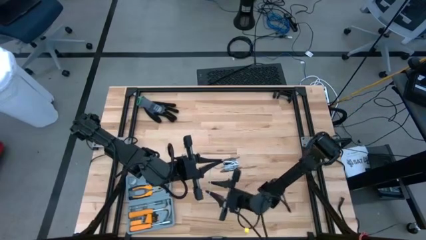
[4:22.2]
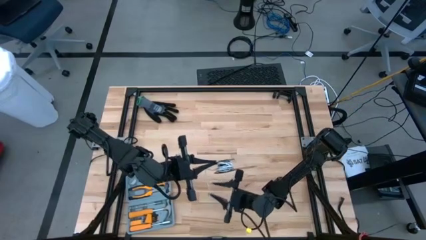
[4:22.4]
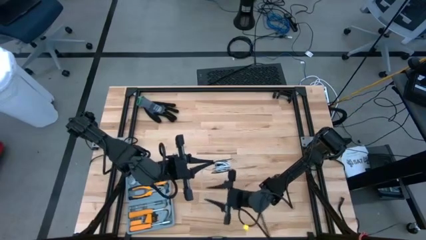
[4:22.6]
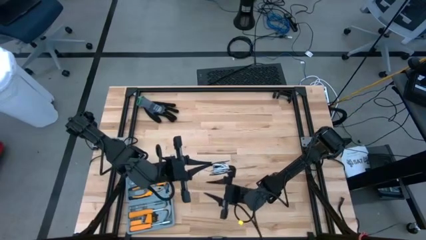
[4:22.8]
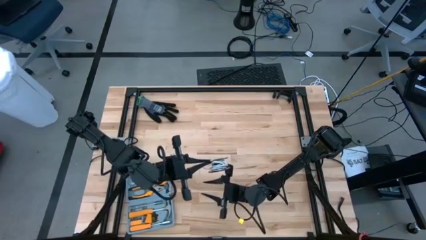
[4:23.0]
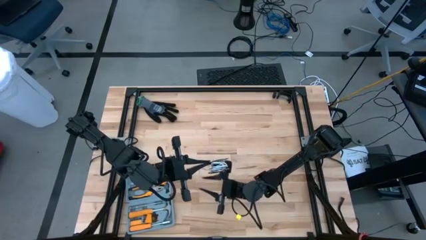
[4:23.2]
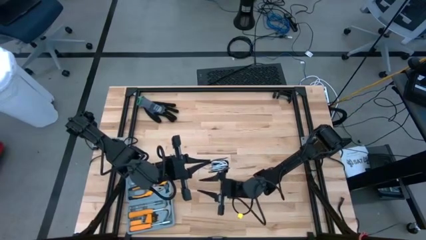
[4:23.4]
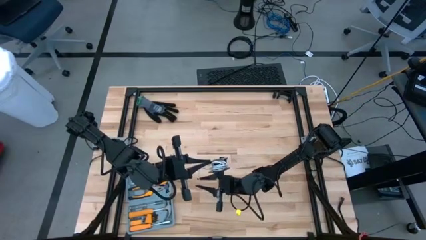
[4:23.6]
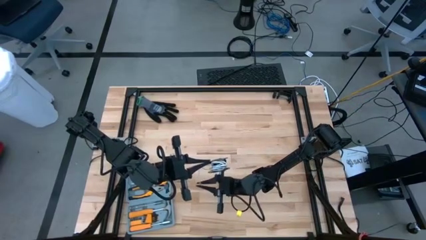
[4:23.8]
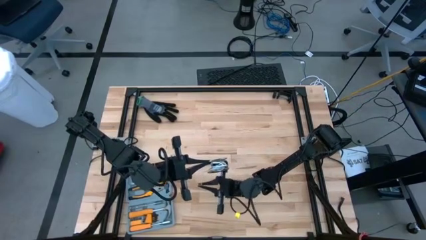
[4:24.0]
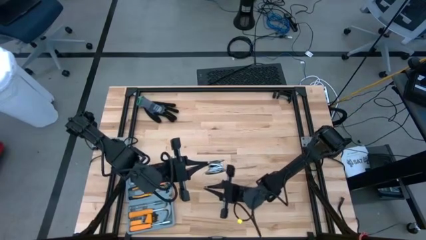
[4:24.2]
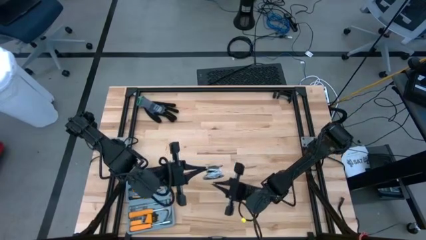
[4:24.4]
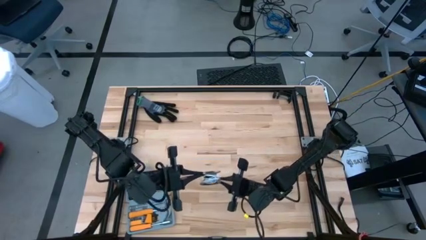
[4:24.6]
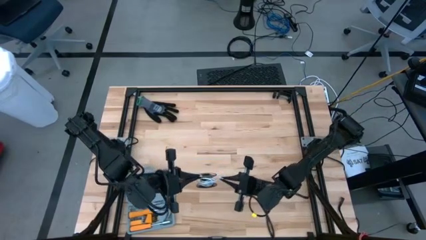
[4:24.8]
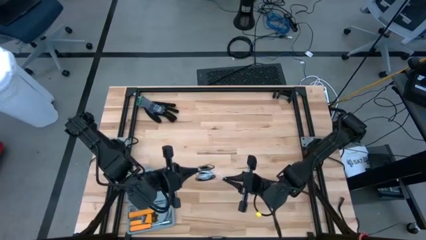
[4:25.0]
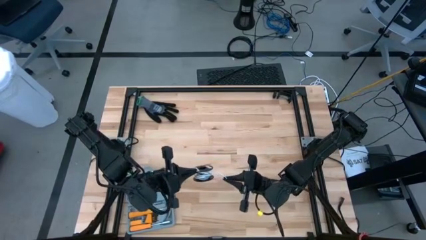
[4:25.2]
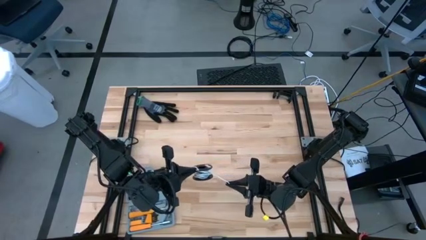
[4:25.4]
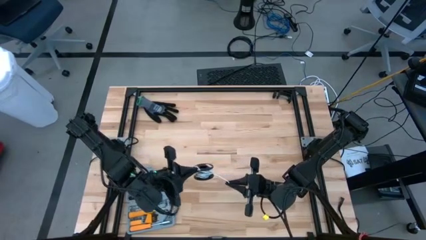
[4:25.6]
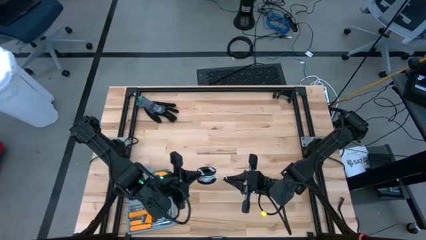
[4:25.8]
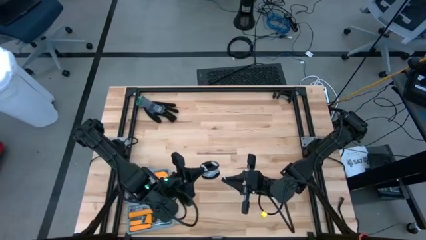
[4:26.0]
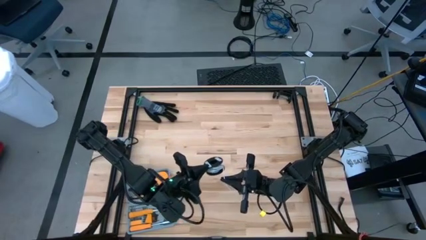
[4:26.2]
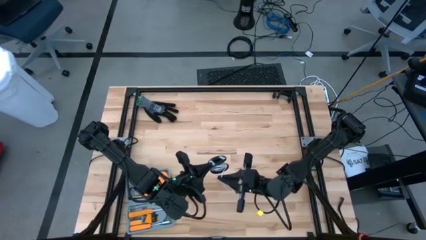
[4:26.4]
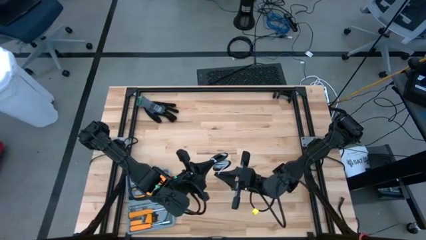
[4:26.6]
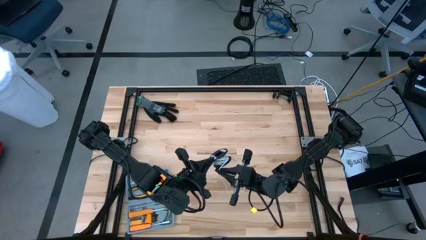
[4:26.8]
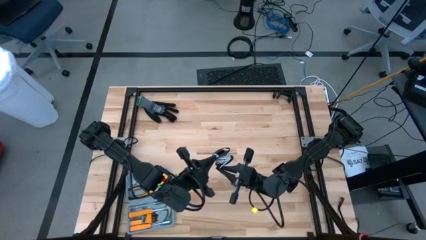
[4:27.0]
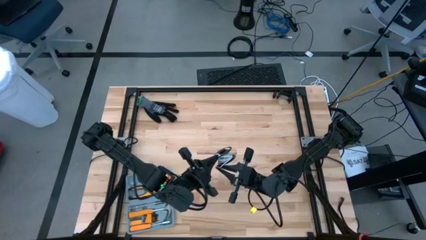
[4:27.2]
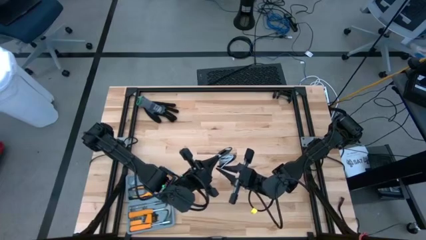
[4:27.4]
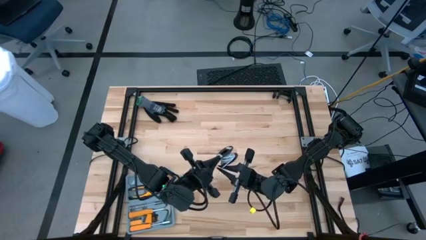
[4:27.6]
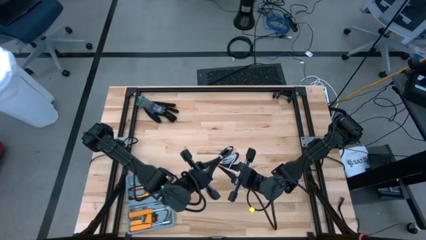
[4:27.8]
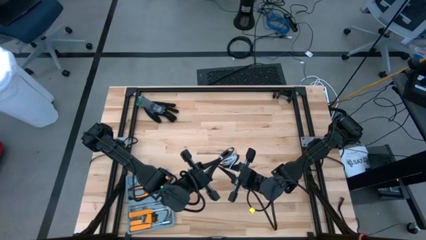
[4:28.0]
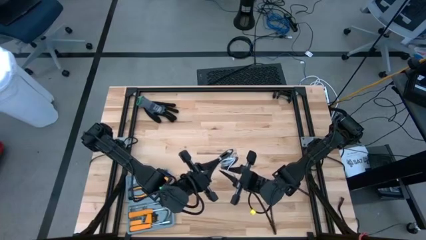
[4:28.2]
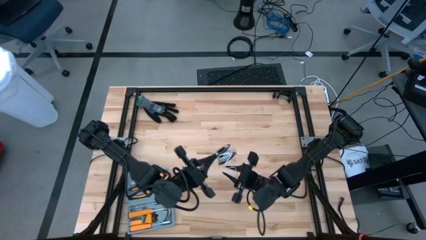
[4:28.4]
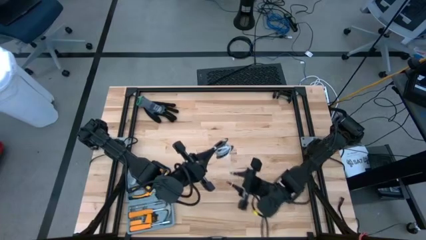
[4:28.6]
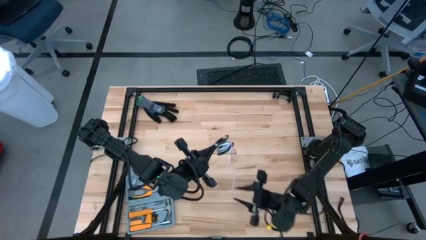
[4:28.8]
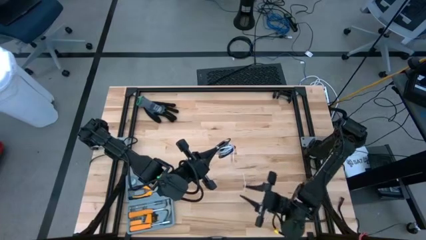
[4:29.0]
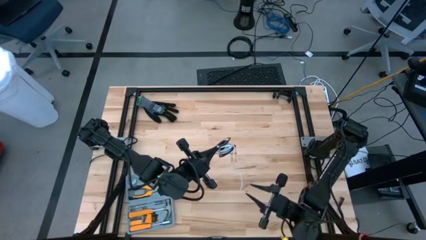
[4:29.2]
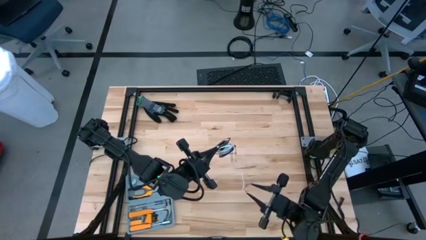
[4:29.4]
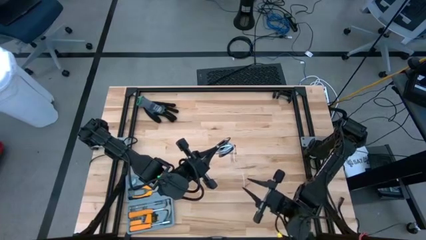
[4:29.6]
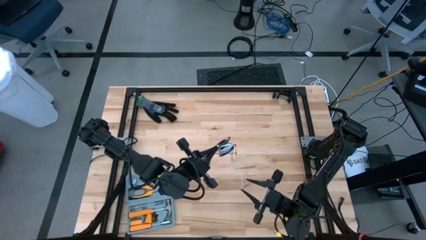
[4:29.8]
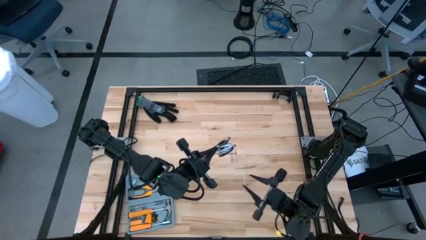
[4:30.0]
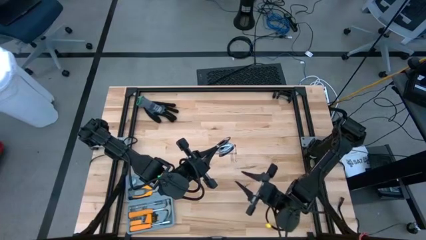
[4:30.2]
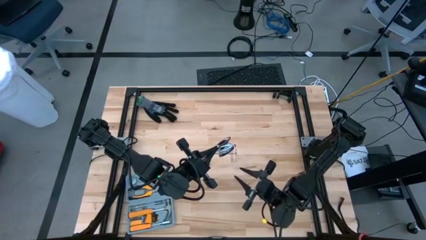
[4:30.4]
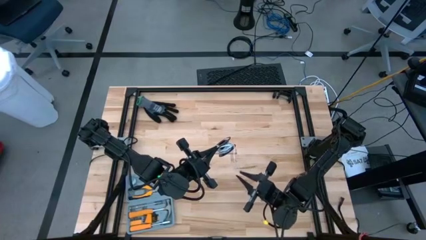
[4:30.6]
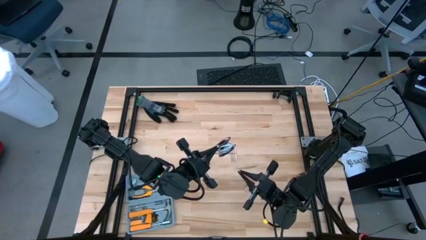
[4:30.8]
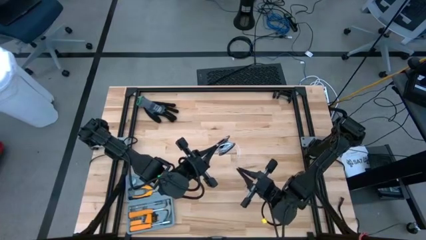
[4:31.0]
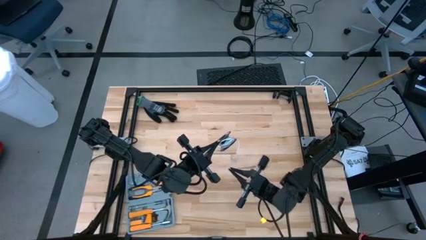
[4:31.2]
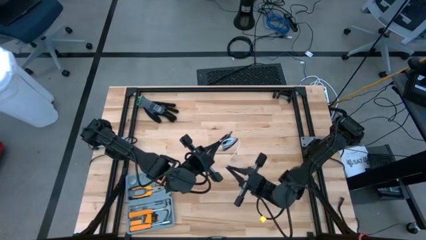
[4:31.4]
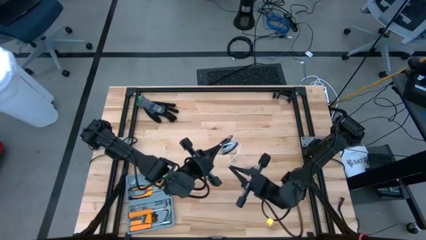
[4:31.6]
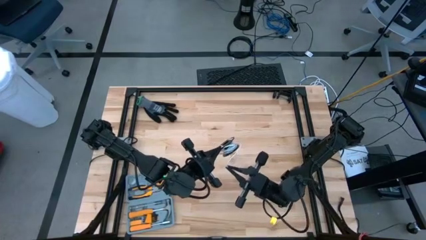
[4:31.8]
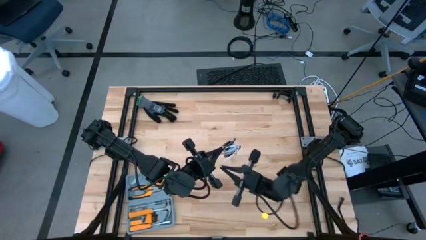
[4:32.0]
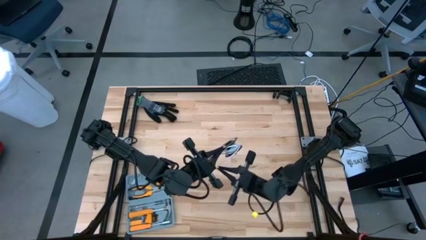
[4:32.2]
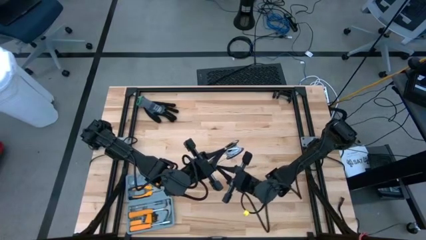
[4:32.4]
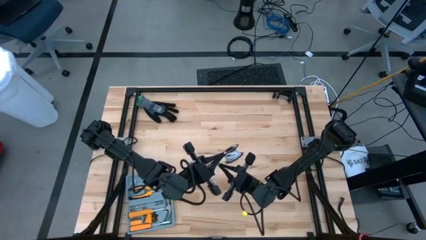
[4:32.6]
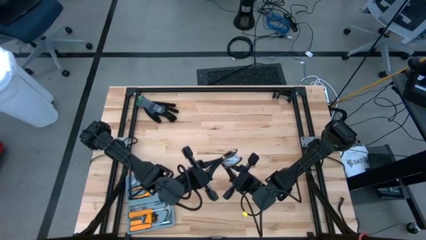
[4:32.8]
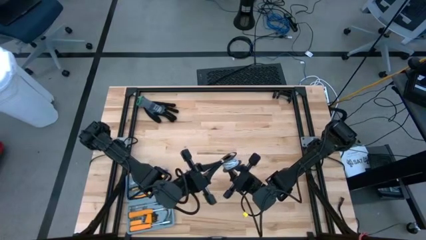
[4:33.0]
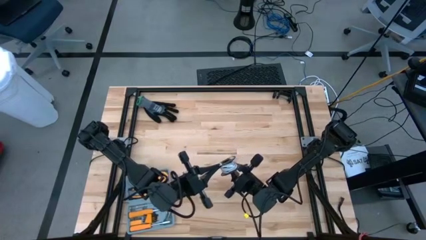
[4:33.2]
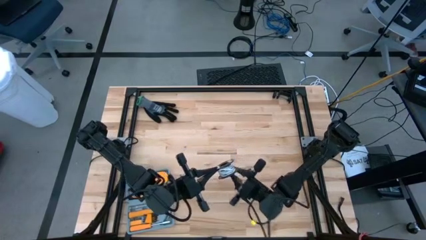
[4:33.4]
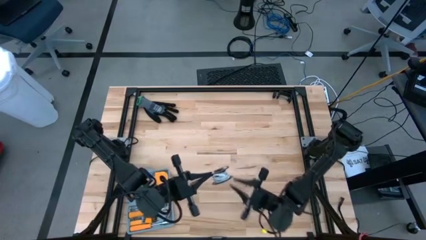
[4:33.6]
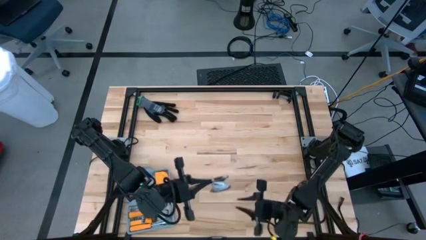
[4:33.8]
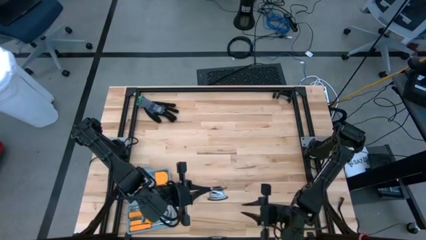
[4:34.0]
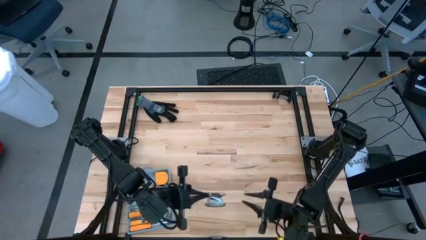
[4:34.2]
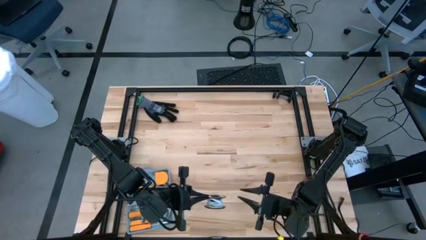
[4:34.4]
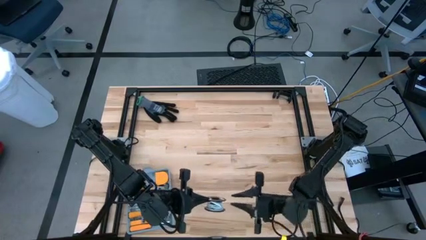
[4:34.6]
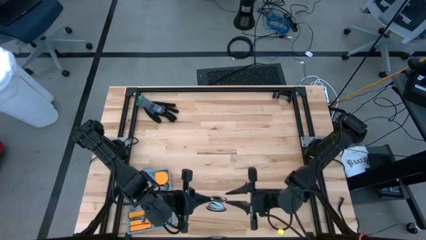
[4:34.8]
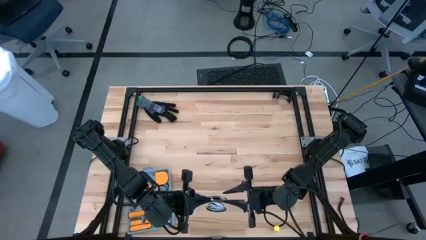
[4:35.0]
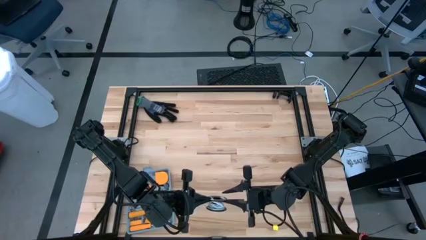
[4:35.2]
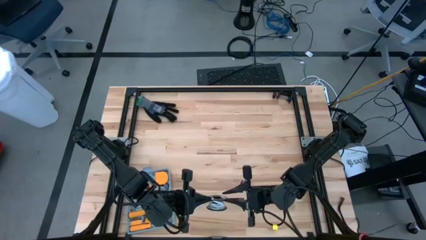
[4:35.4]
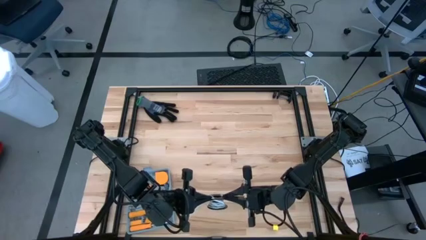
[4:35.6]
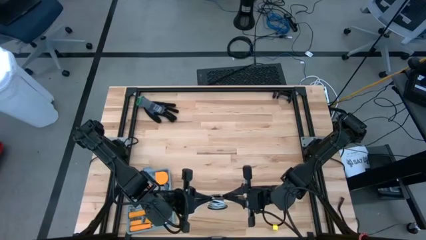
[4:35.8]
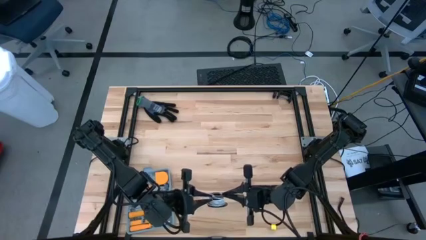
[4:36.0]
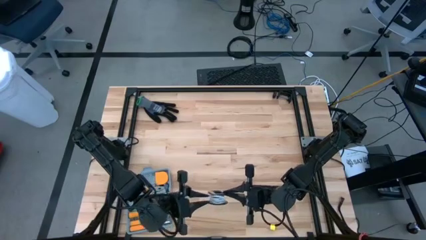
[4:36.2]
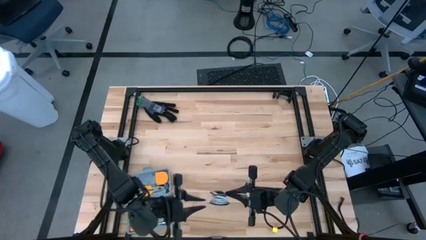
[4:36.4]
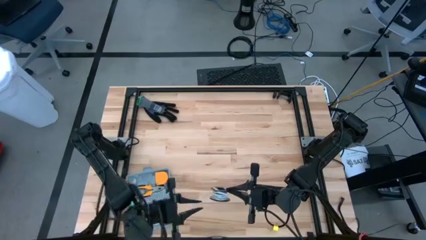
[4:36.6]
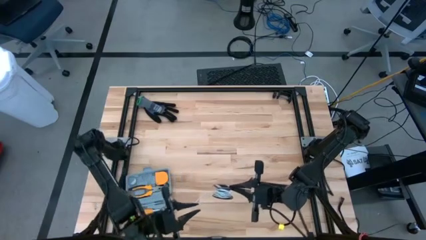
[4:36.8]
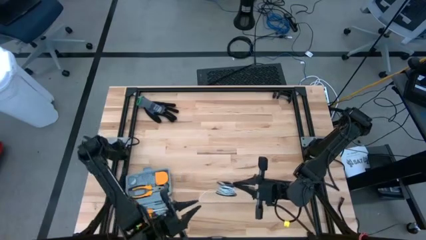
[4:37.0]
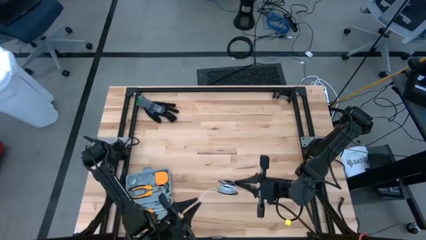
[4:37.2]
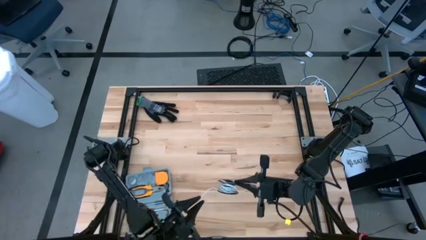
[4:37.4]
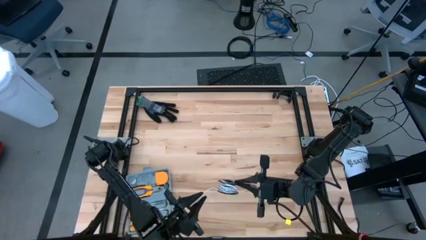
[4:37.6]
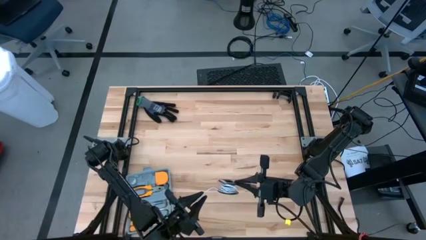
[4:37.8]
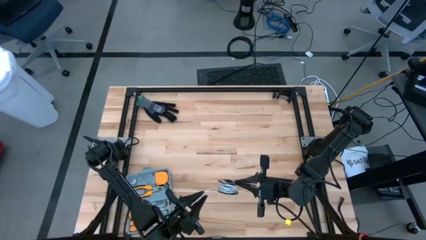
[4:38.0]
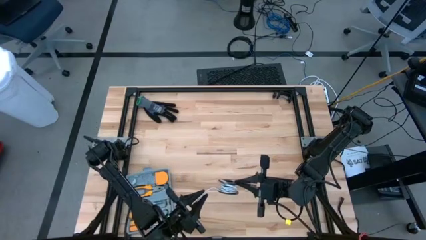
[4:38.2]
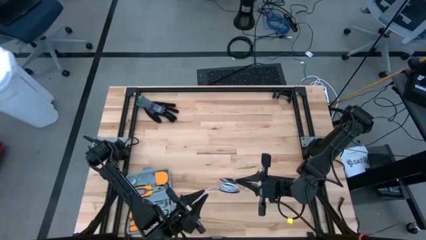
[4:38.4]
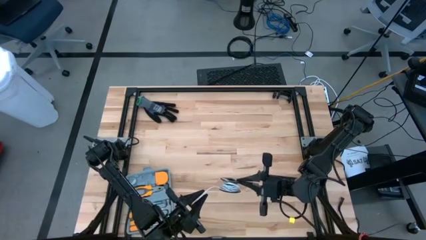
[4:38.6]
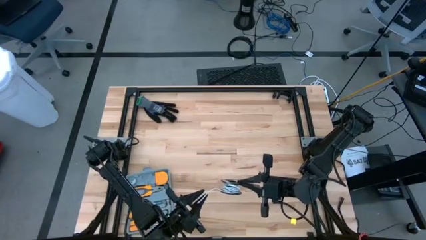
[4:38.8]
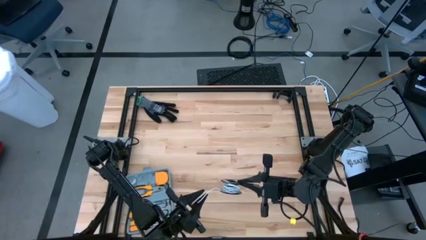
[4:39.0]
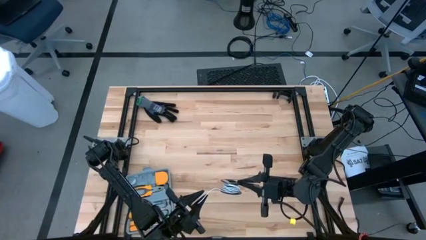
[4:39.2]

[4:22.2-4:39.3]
Task: Coil cords
Coil the white cable wire into the spool
